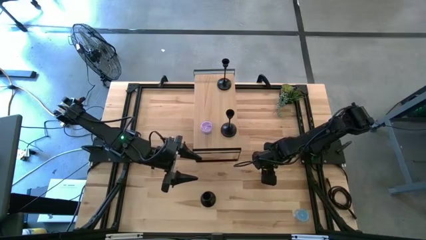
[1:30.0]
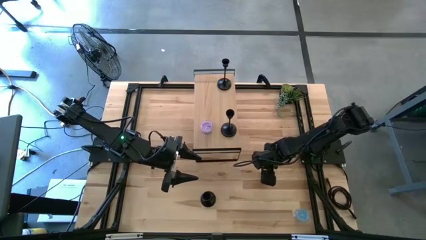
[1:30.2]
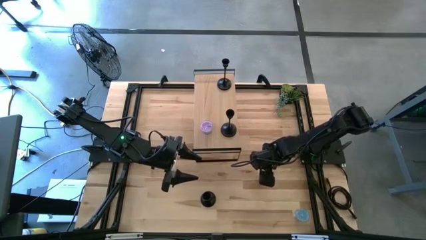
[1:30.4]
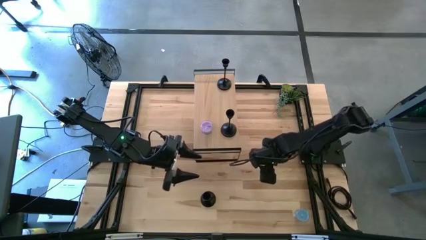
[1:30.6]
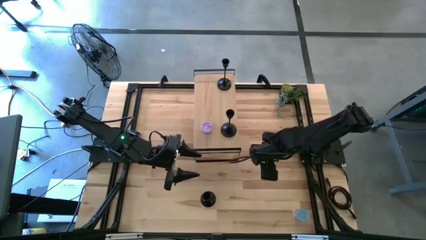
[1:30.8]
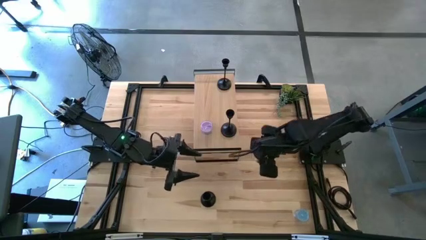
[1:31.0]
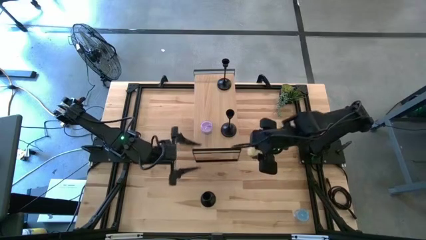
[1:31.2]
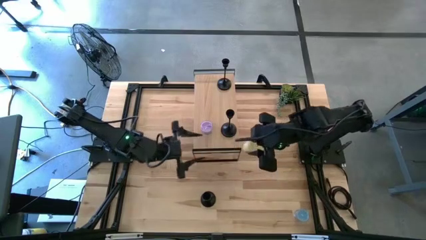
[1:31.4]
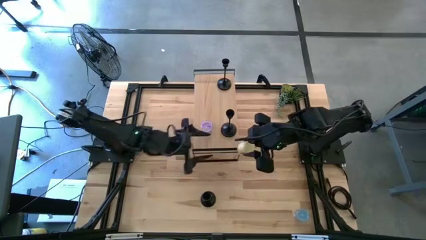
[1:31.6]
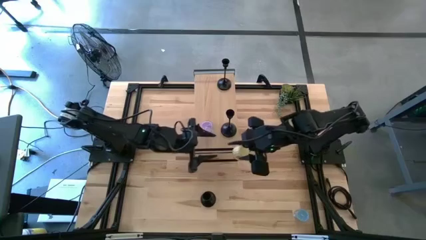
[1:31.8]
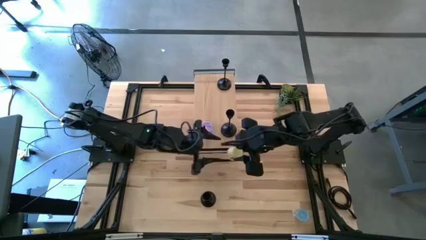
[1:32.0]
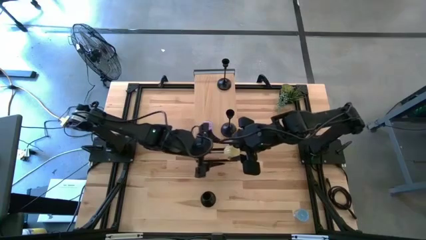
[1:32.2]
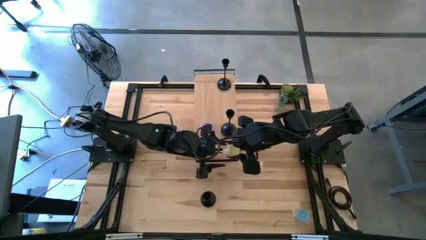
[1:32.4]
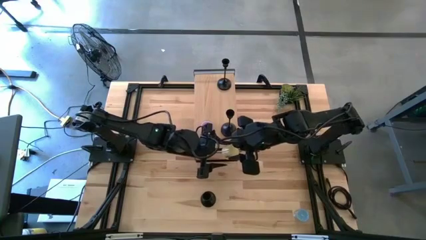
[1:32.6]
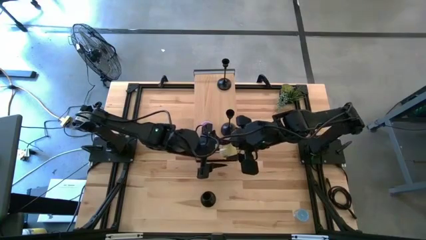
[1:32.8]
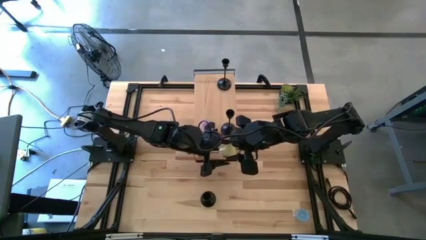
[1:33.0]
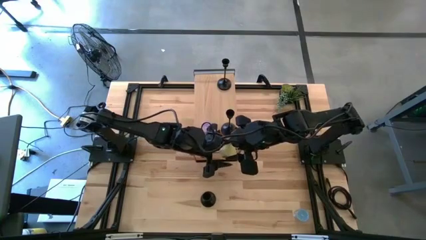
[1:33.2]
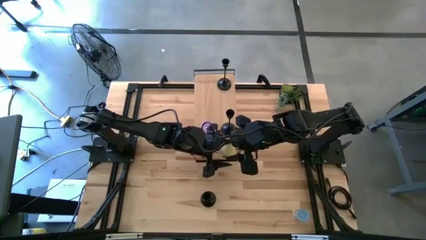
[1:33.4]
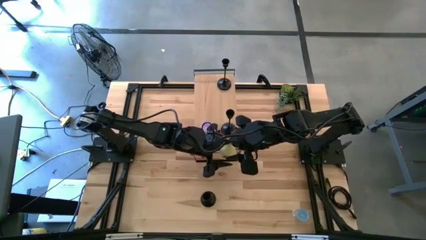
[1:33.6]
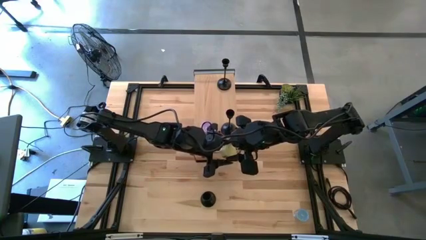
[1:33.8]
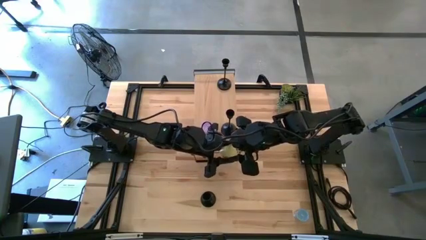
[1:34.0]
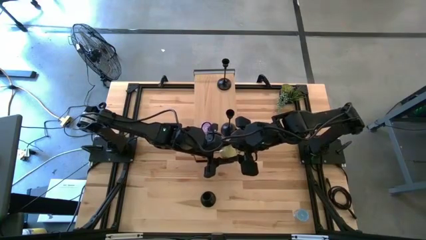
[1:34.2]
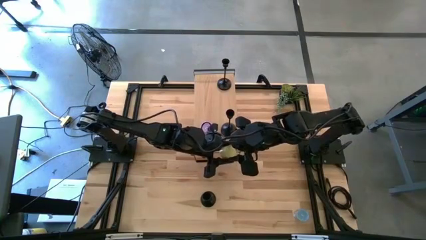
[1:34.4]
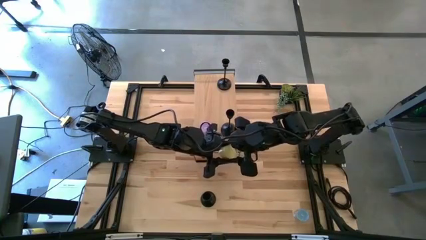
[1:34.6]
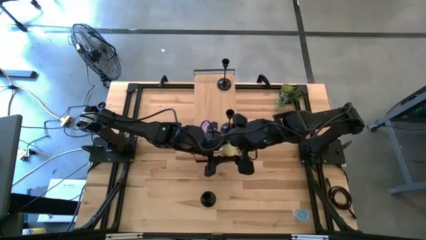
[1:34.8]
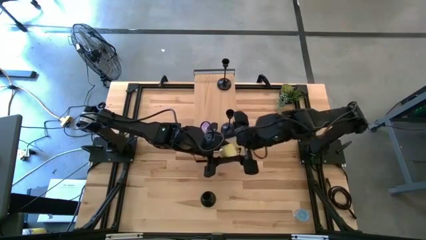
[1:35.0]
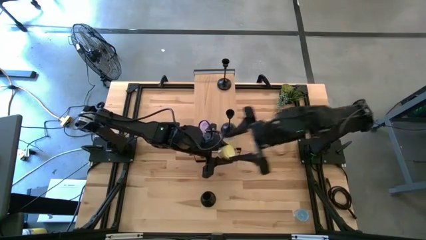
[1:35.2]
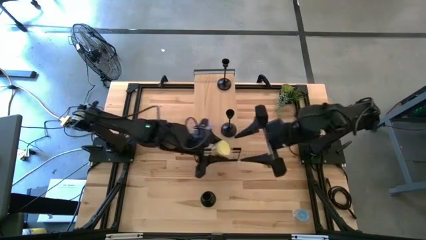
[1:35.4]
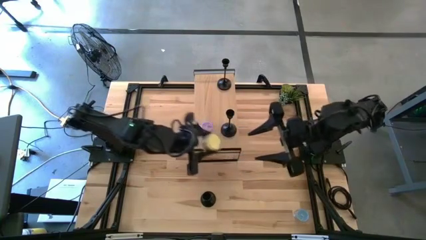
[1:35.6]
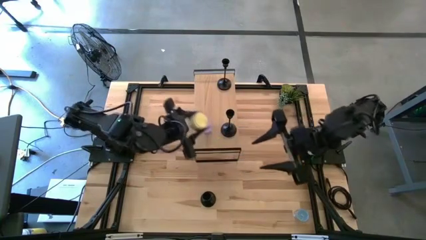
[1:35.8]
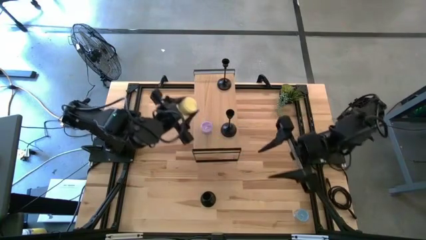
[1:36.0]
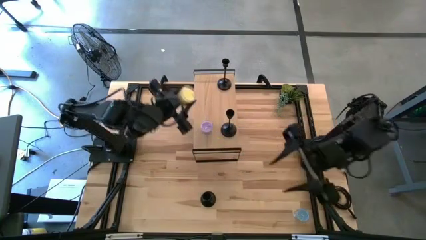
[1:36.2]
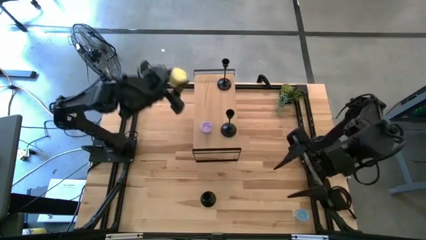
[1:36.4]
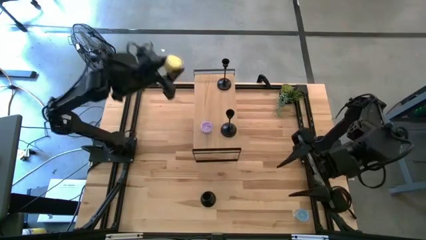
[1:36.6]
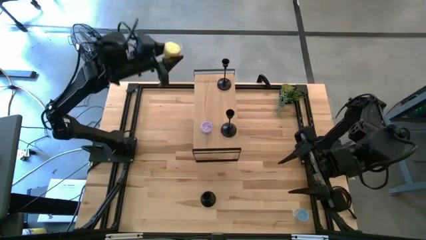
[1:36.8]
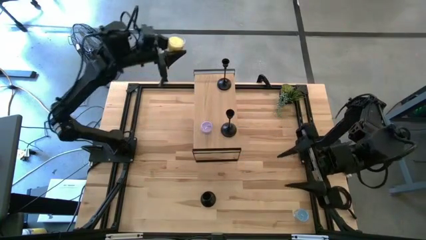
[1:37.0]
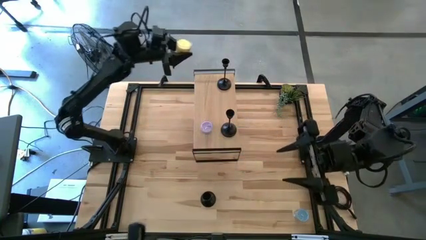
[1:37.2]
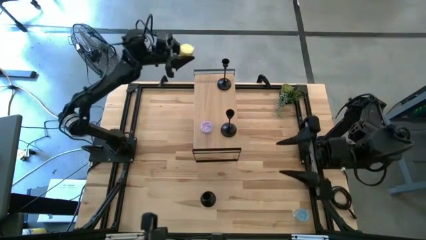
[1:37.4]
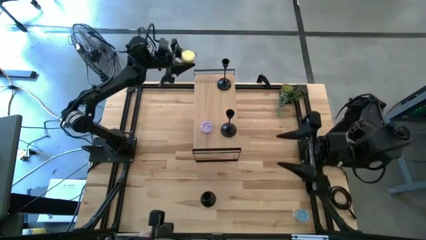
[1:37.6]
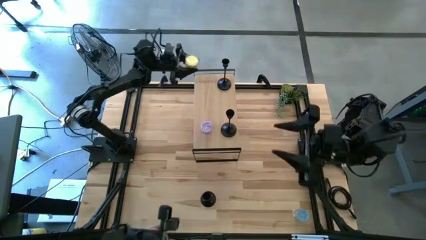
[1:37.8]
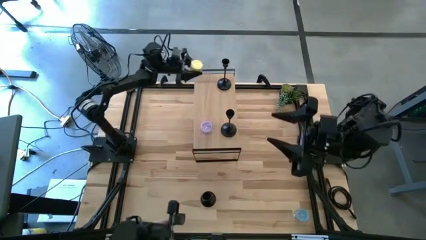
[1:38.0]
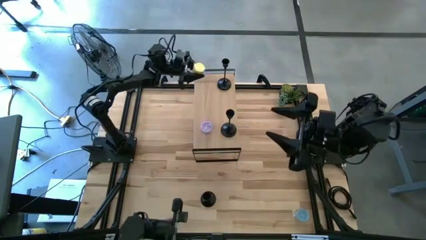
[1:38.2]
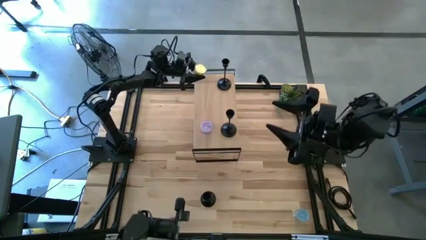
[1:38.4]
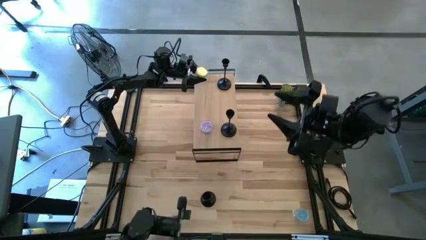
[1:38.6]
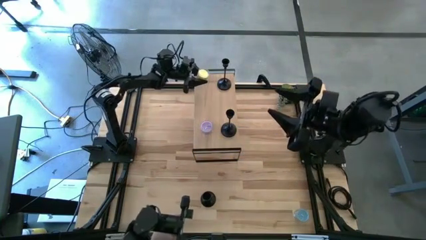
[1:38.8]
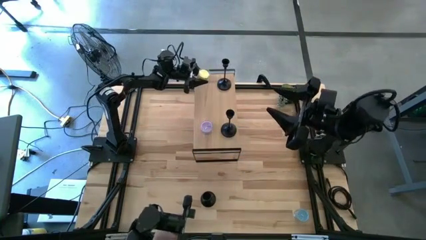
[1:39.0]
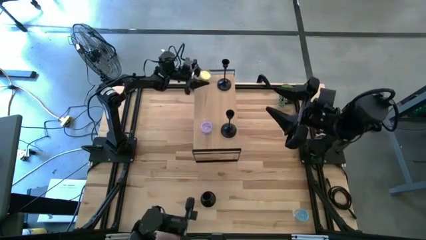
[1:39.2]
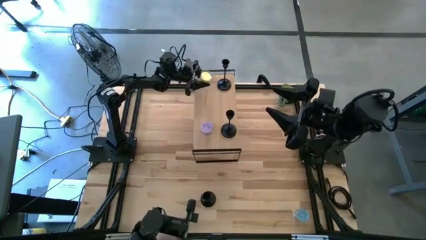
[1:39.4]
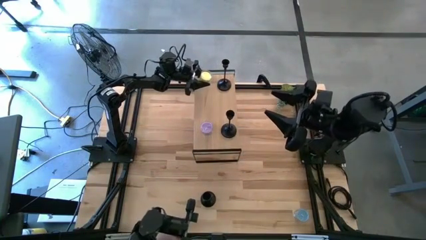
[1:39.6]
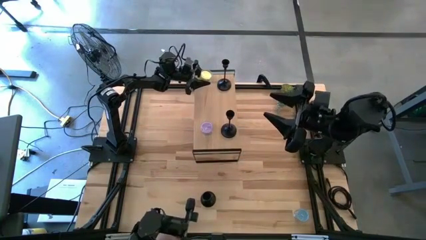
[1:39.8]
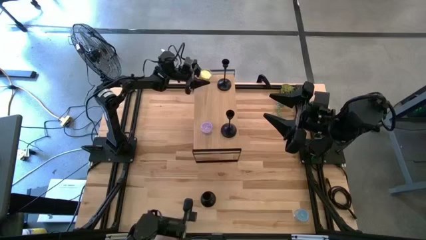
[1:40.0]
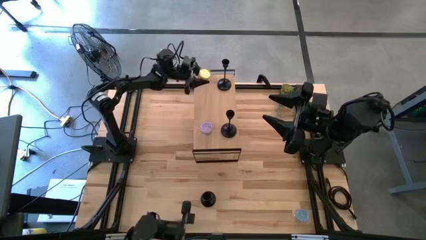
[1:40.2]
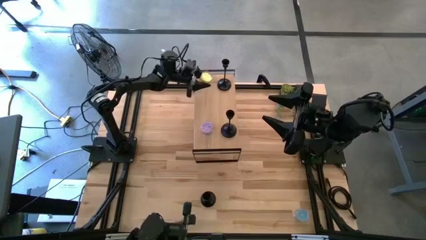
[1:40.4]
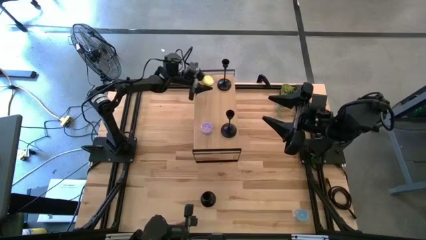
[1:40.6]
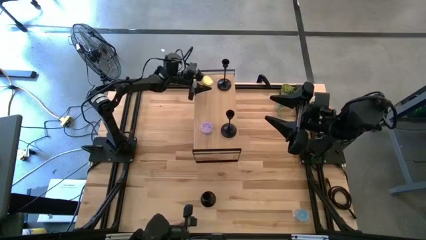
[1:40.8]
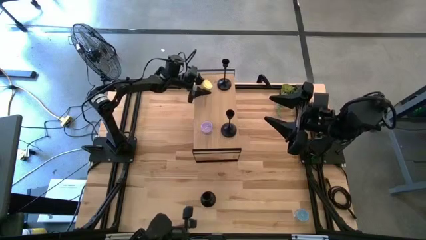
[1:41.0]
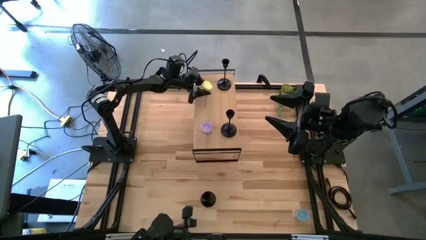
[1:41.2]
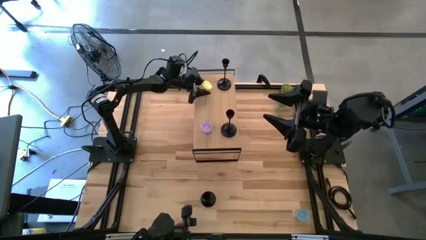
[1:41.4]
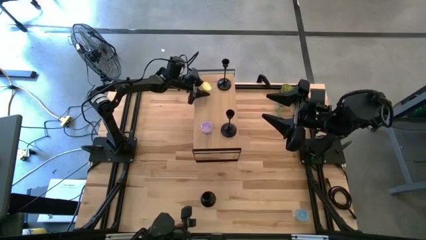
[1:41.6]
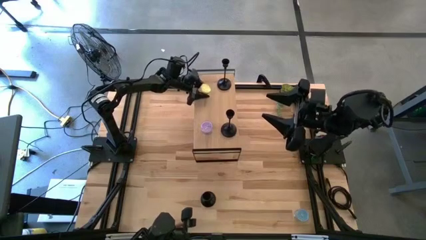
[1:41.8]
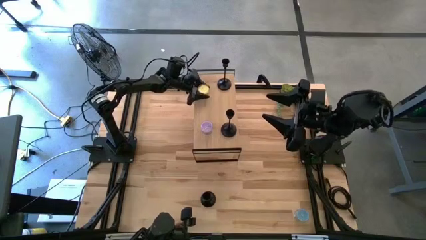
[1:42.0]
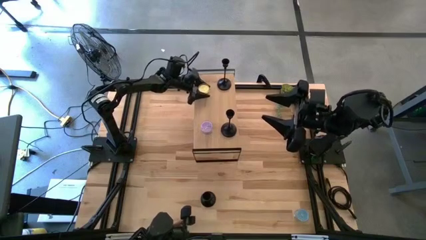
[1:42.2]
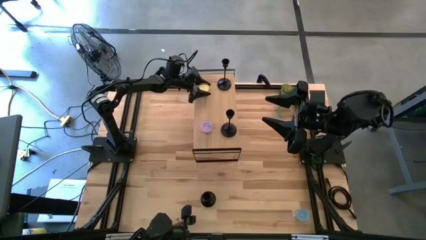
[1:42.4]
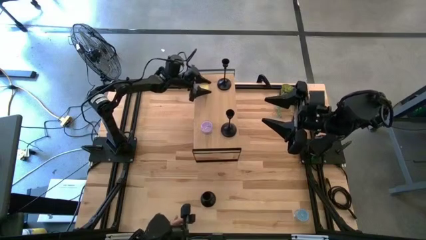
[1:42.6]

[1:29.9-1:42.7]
Task: Pick & Place candle stick holders
Put the yellow scented candle on the shelf

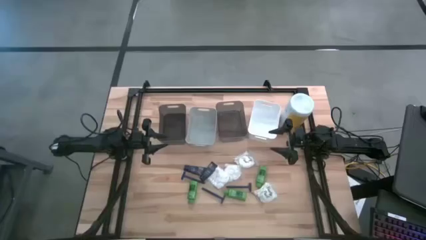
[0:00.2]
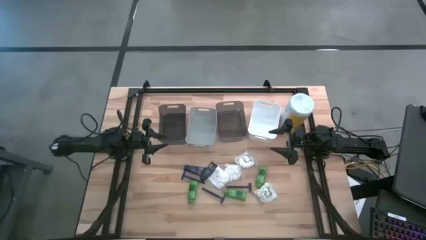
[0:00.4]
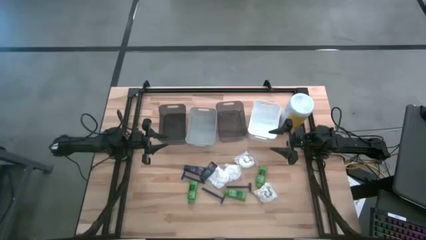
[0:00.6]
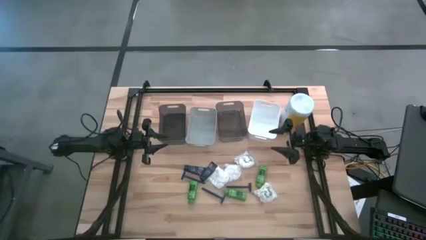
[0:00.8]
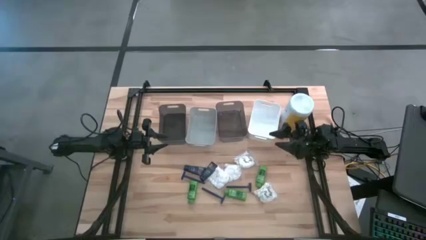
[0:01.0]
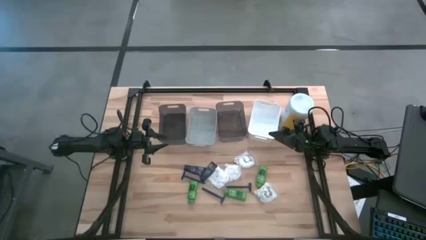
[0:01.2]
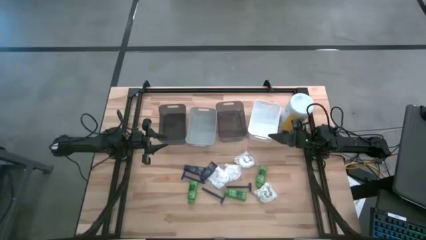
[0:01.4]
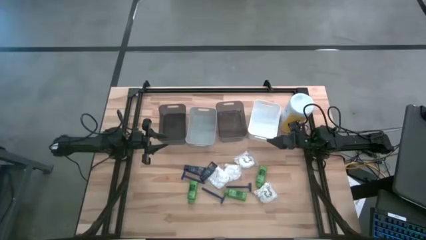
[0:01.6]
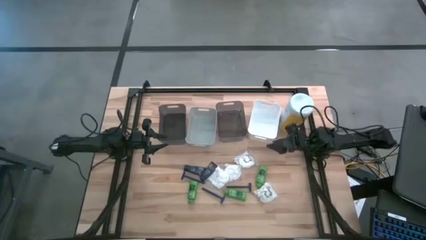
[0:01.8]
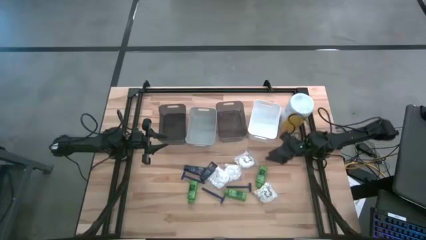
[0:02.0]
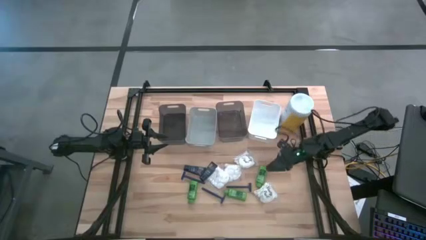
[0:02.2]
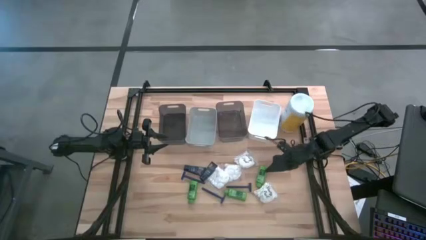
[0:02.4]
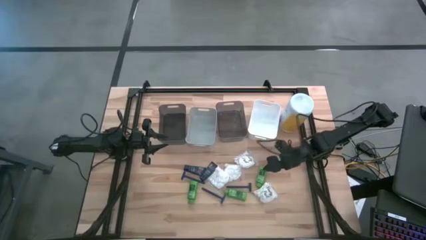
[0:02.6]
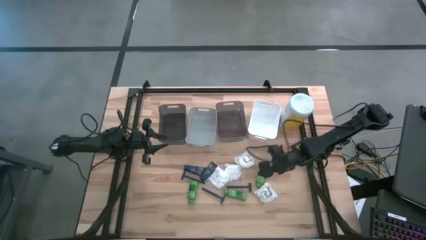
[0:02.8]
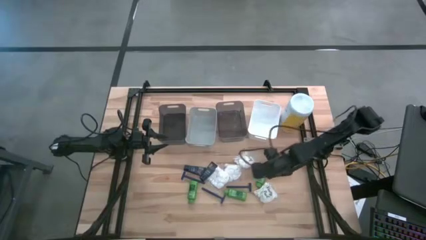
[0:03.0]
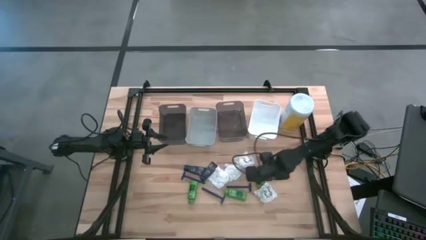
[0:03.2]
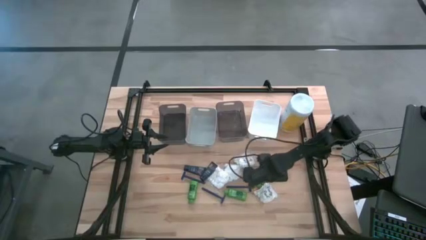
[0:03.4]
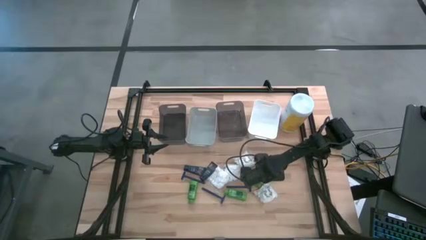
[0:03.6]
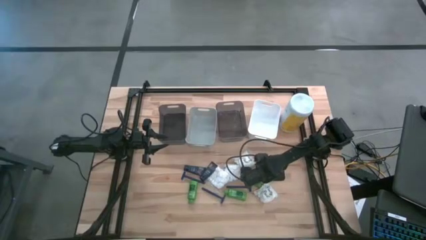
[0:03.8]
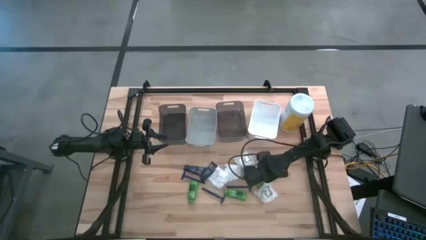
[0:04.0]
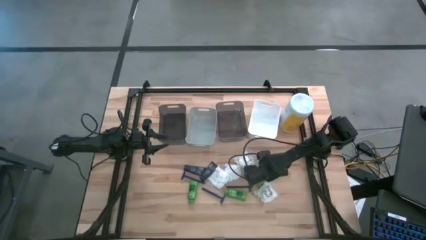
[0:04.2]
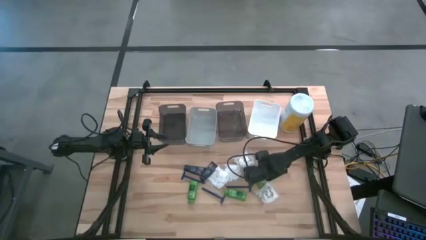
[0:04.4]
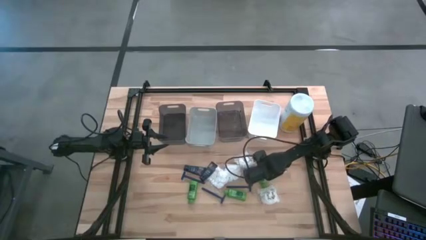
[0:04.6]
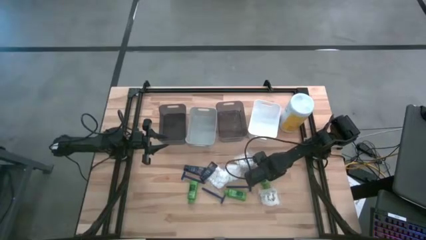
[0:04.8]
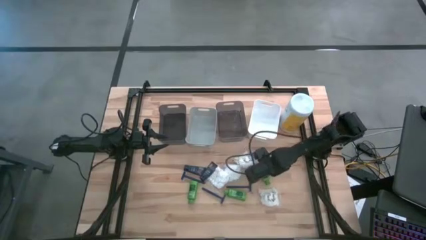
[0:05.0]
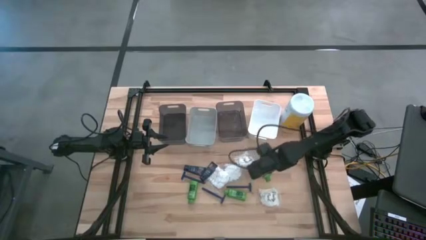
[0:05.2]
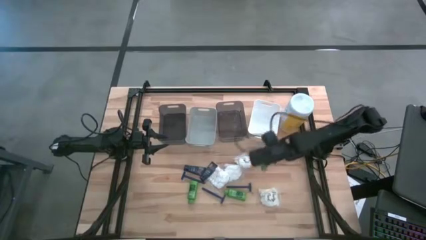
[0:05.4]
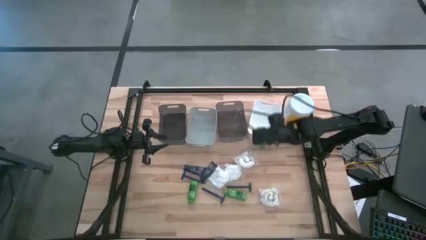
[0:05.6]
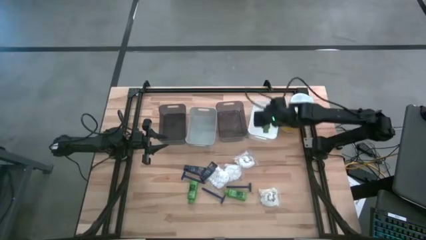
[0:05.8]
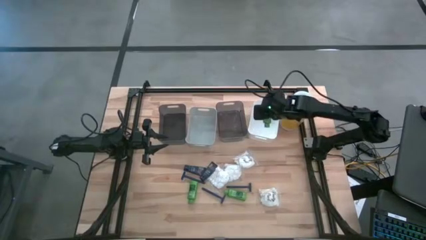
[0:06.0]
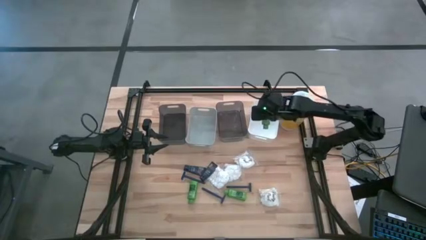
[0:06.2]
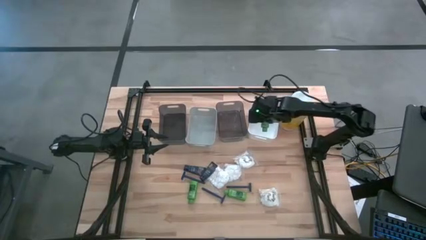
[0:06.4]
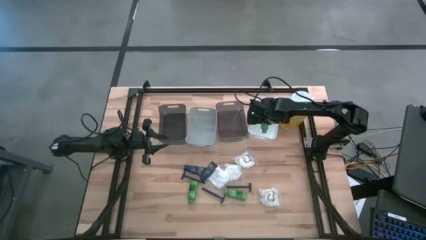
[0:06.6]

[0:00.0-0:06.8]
Task: Pick & Place Travel size toiletries
Put the green shampoo into the white bin
